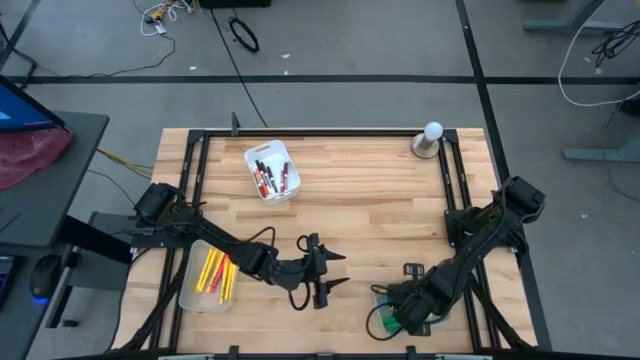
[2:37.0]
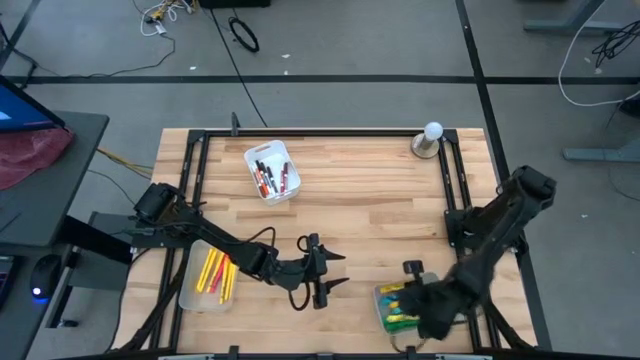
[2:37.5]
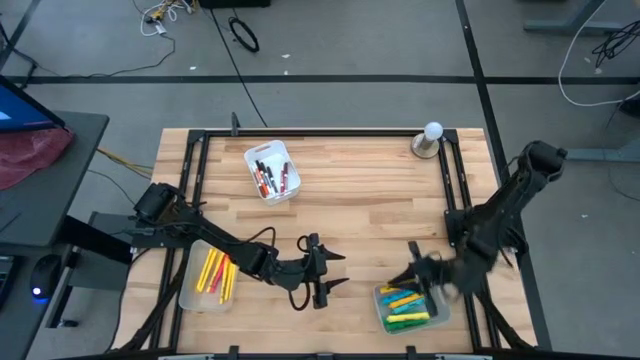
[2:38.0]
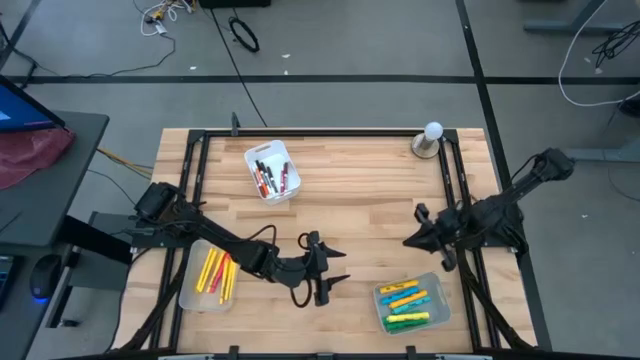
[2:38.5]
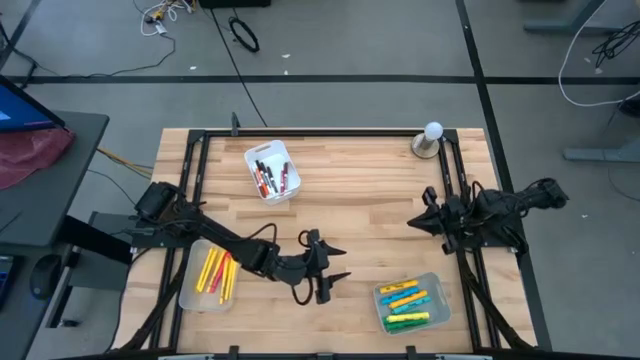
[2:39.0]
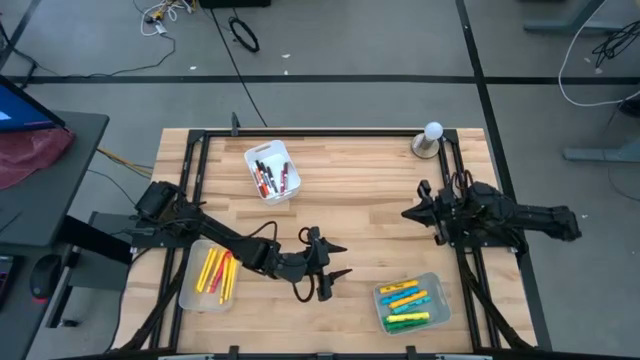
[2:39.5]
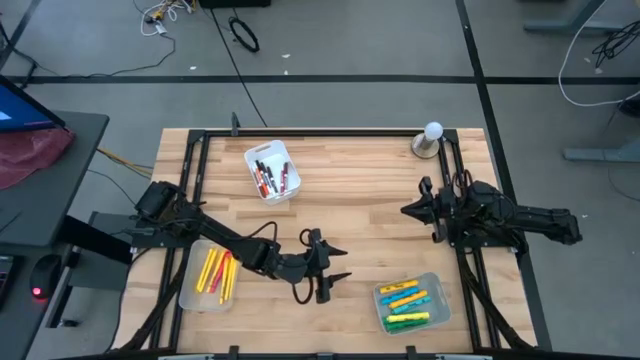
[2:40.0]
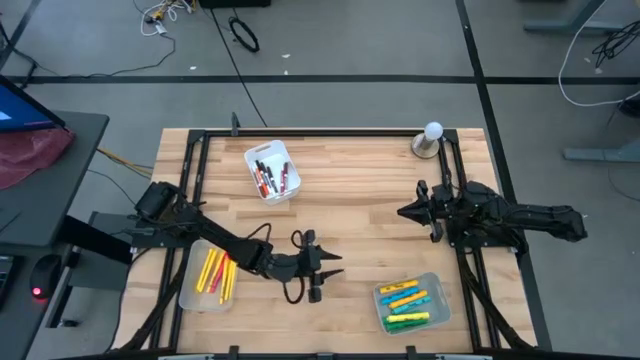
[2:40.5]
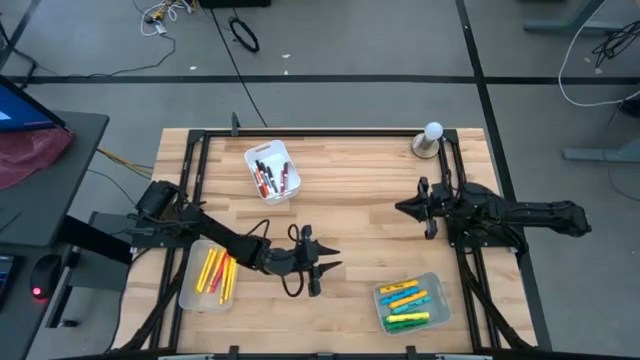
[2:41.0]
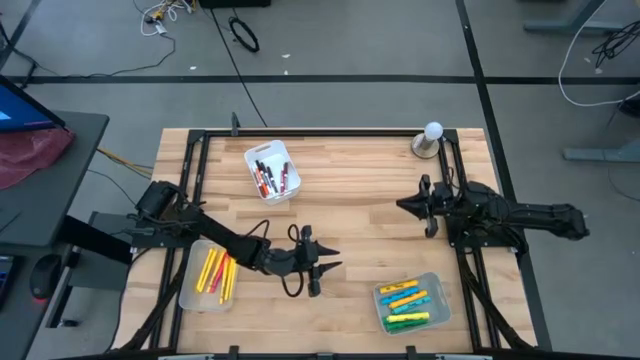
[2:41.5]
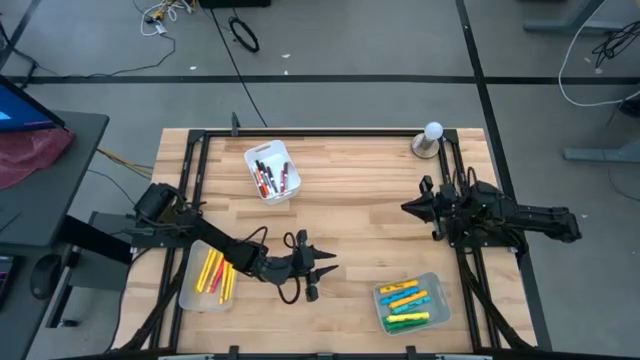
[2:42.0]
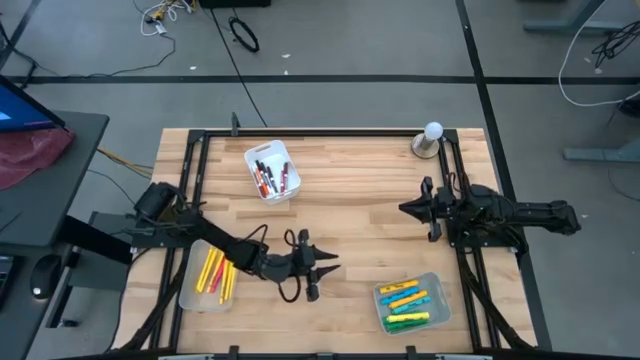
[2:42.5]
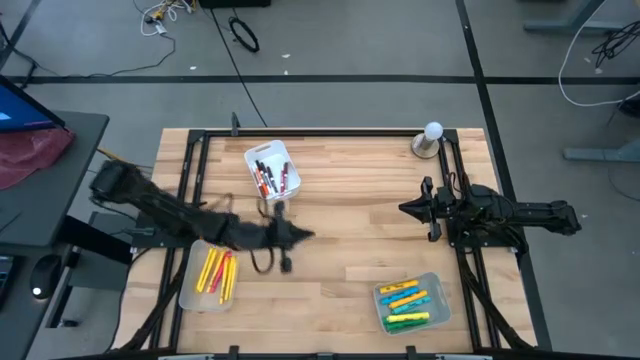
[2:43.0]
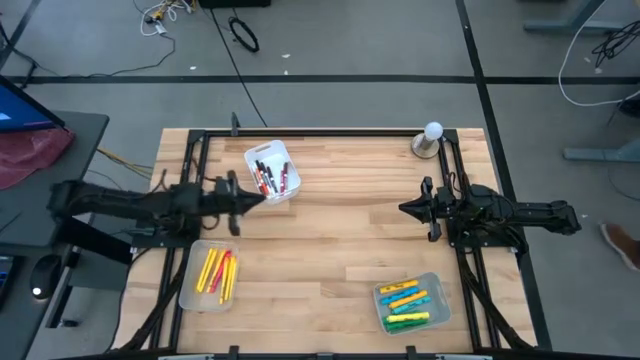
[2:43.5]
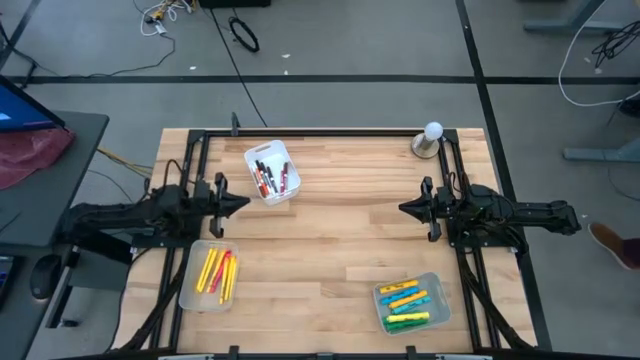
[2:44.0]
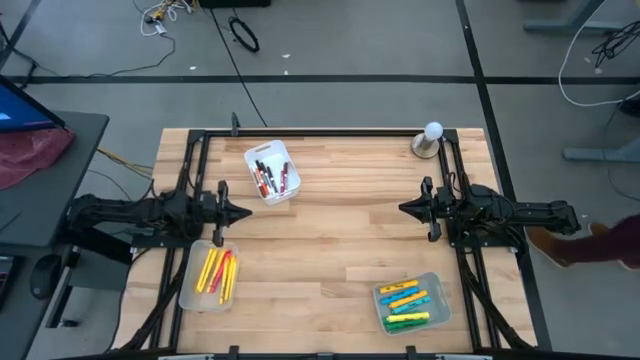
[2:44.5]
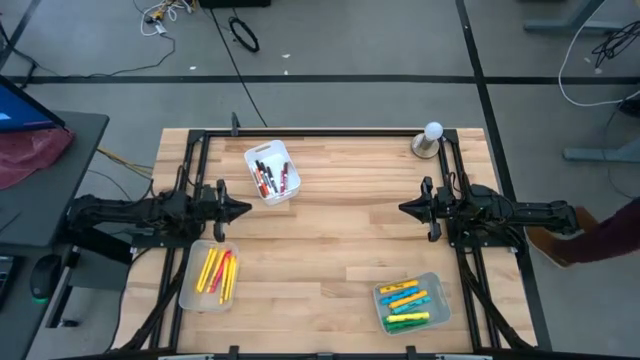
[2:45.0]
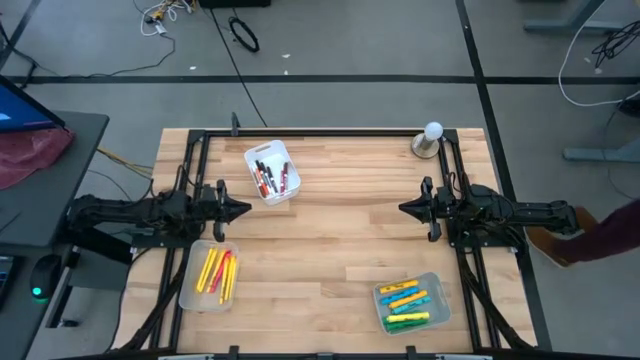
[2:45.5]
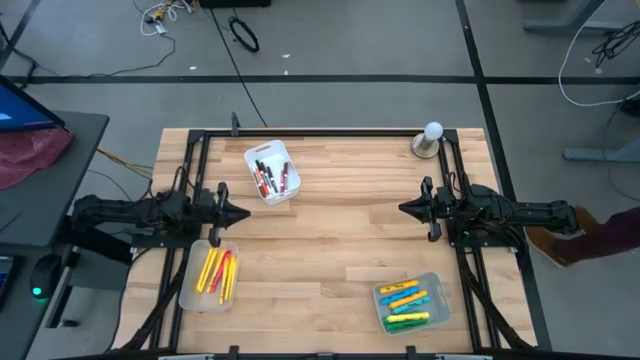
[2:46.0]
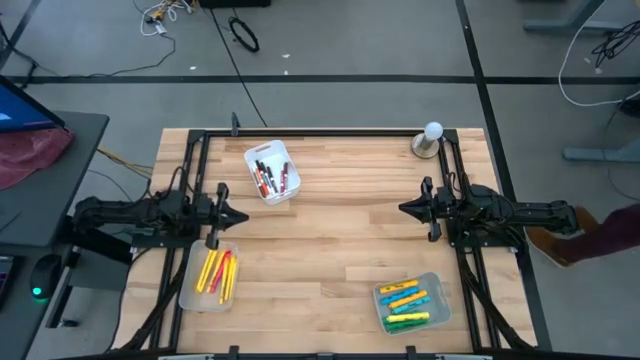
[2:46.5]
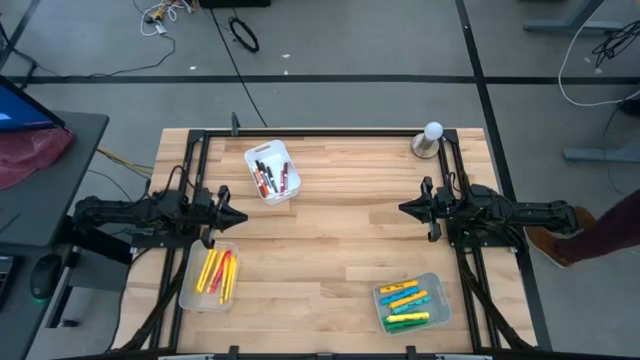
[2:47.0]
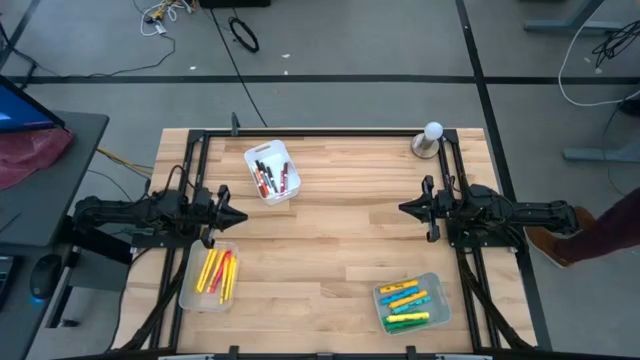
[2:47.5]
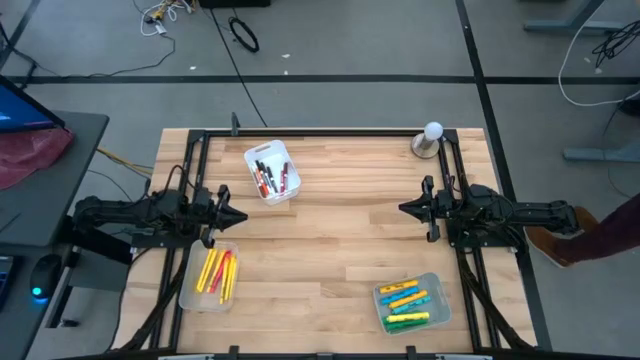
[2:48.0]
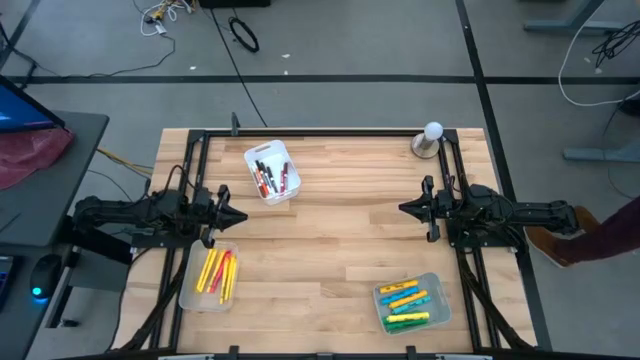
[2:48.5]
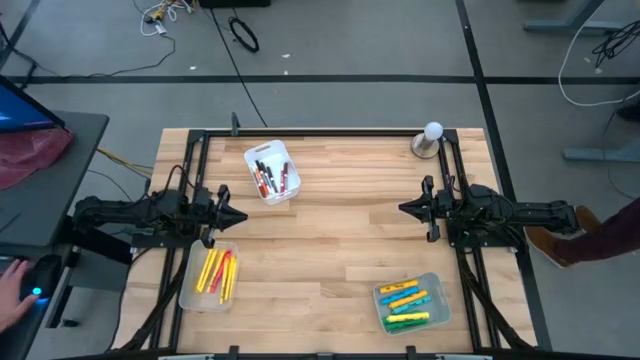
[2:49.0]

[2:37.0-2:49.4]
Task: Pick & Place Markers
Return to Home Position

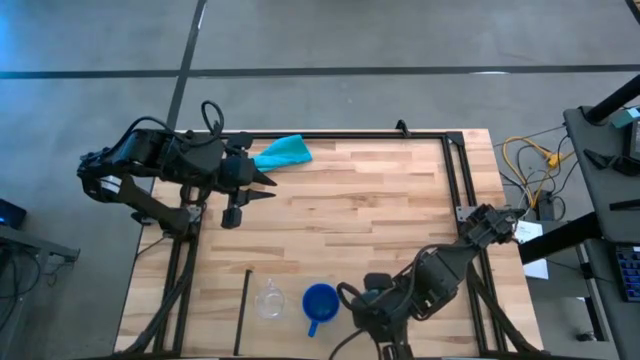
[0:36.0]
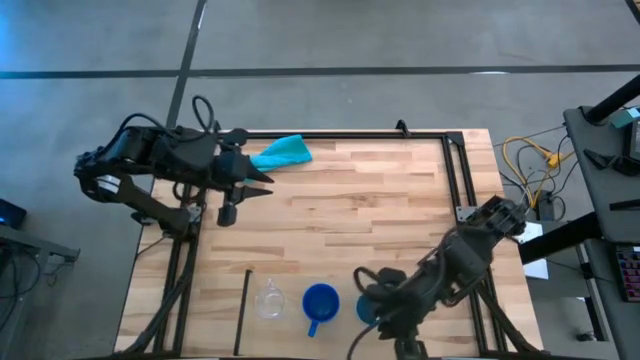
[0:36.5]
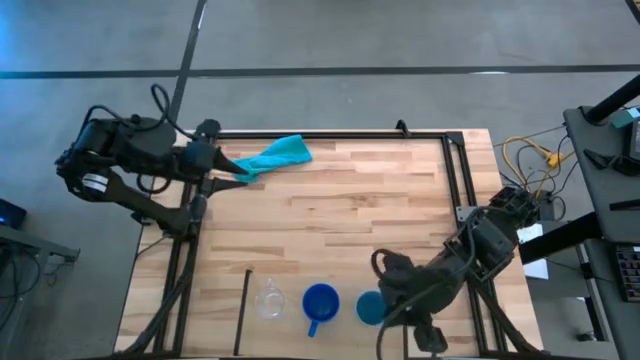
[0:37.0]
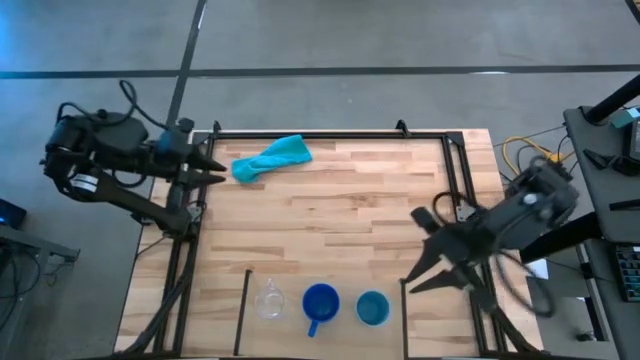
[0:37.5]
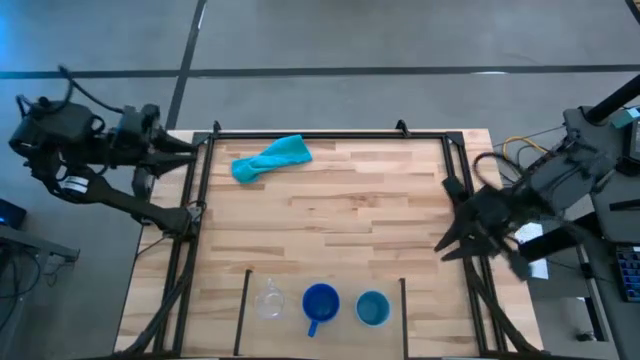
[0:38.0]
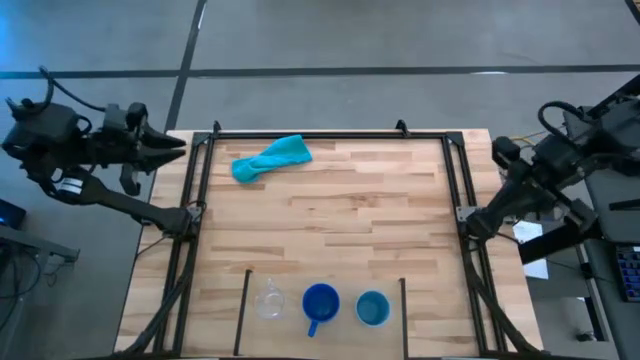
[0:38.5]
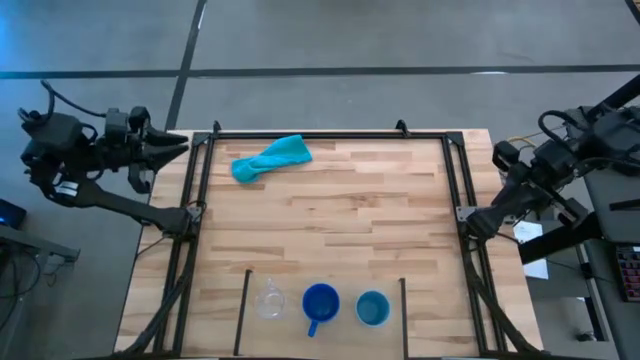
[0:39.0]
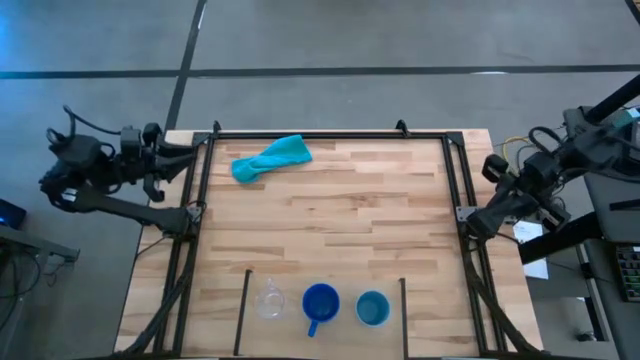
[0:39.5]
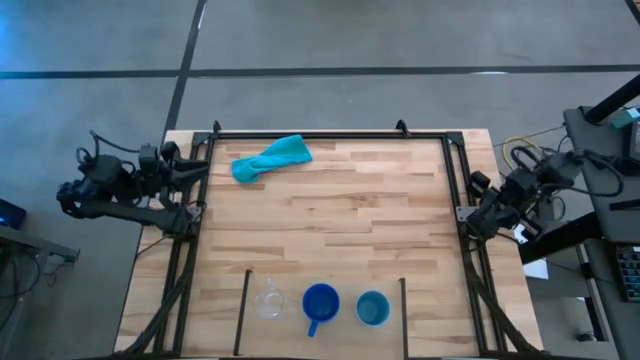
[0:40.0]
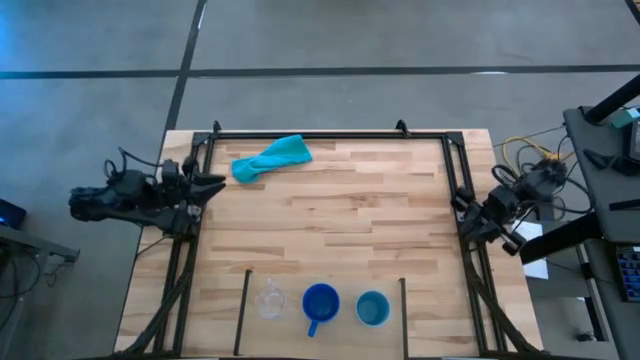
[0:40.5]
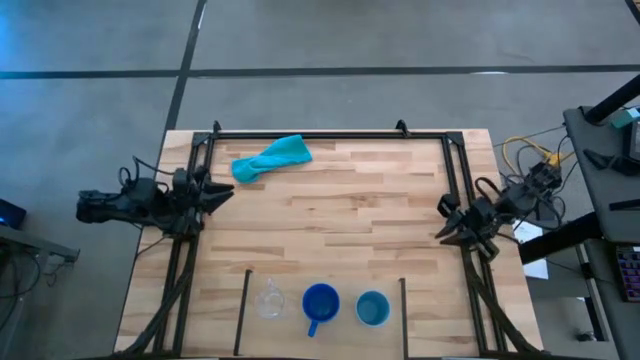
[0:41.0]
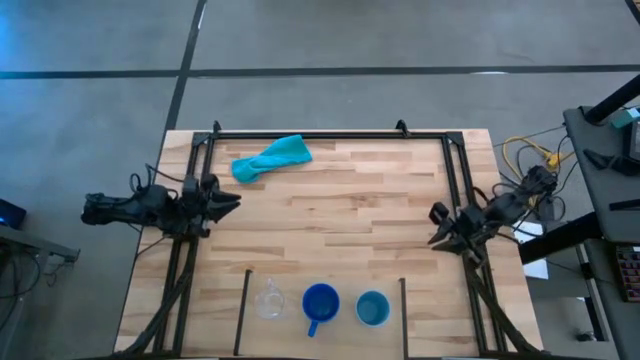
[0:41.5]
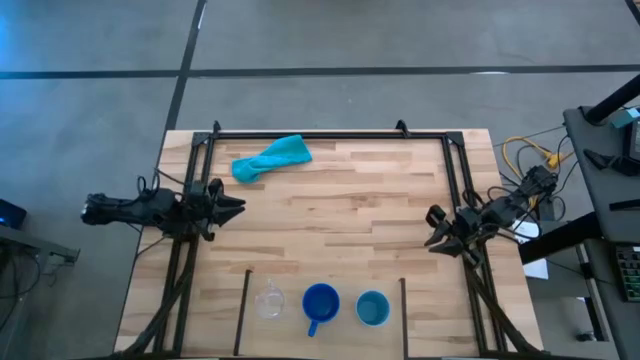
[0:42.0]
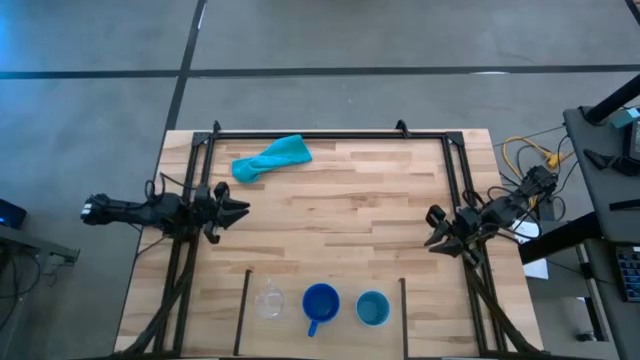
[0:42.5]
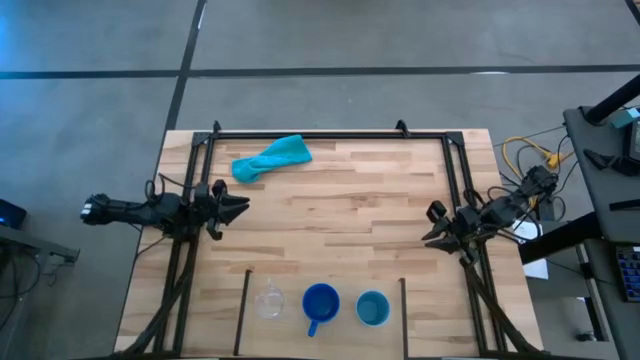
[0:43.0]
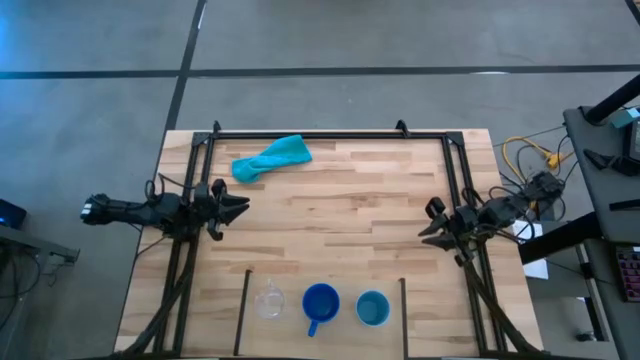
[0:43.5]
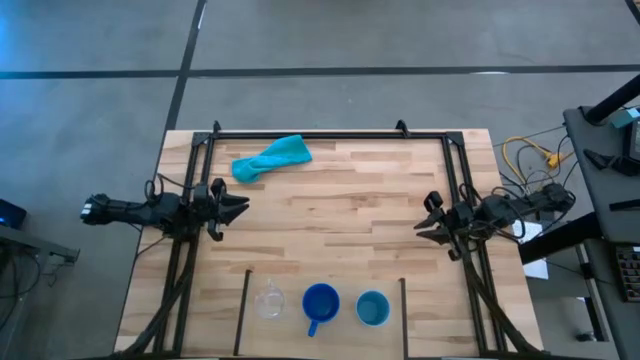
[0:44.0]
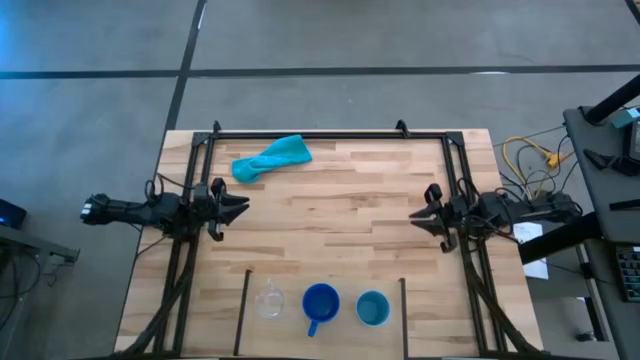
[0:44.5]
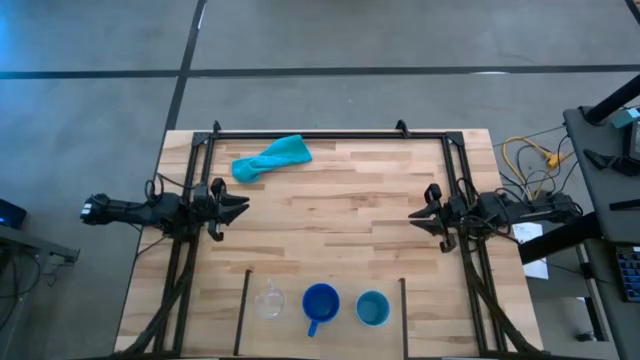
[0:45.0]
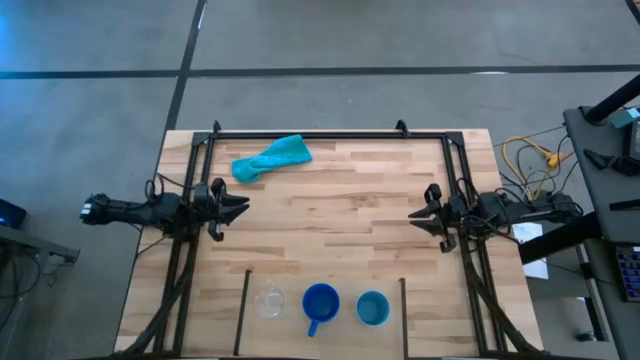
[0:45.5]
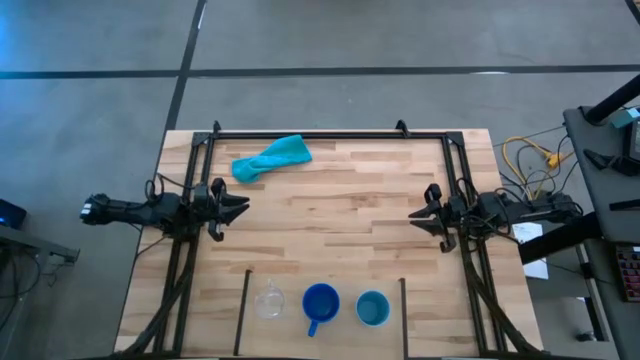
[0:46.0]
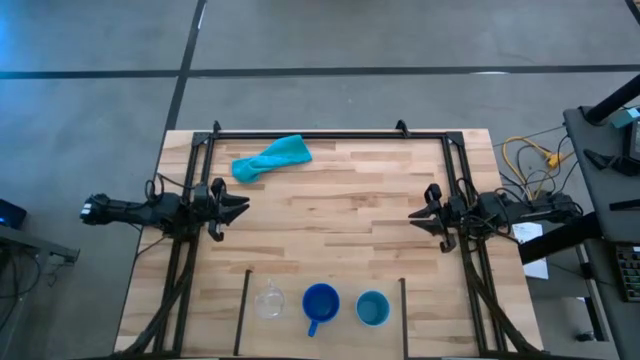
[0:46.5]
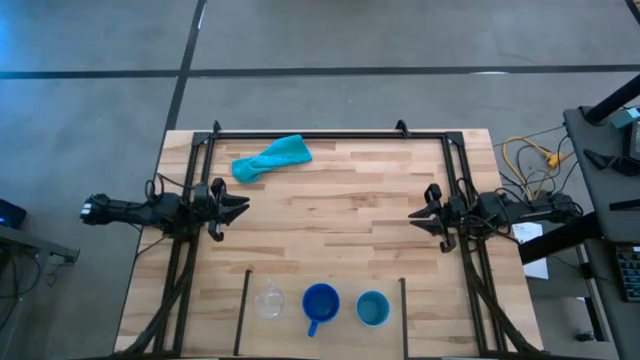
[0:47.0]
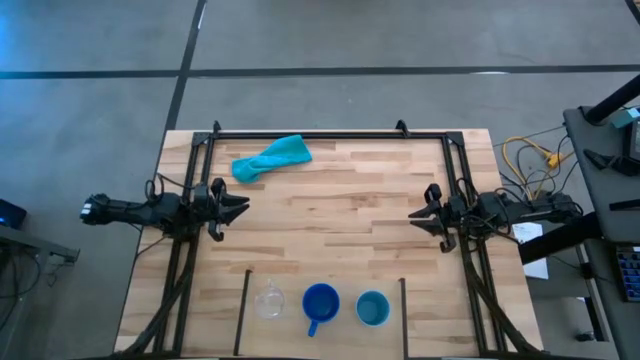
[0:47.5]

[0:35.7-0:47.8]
Task: Stack small to large cups/mugs on shelf
Return to Home Position
